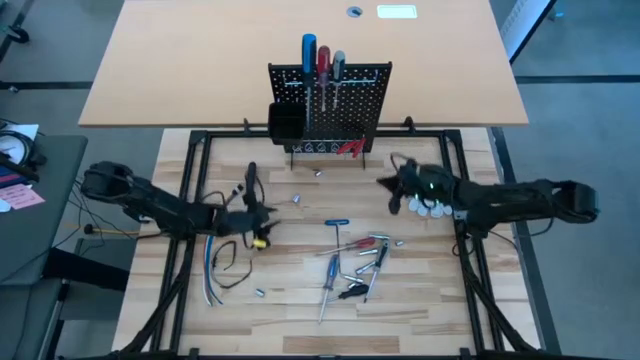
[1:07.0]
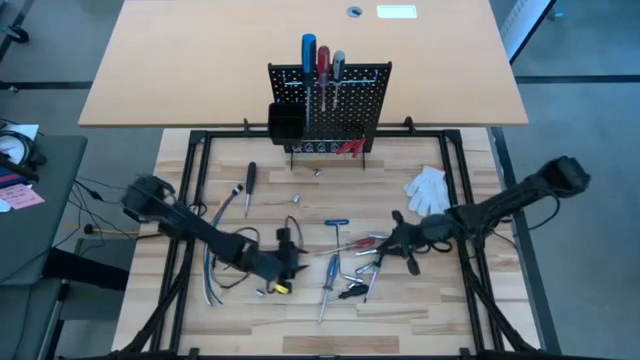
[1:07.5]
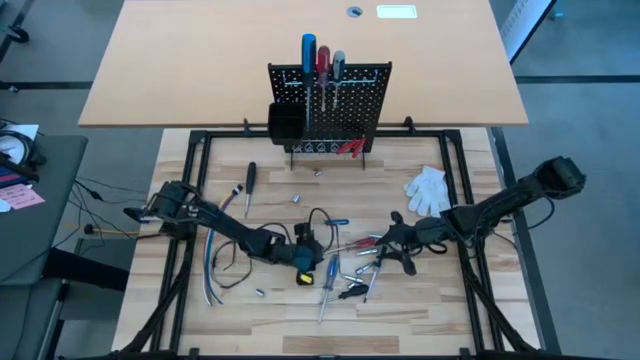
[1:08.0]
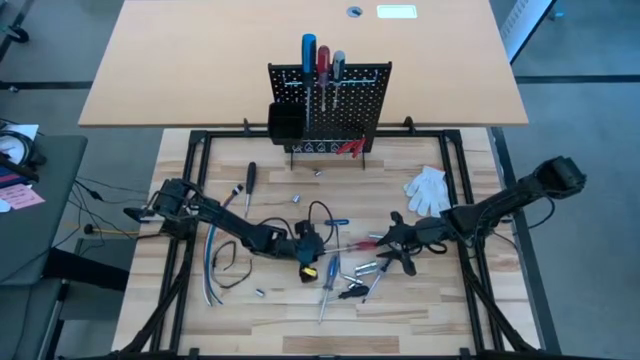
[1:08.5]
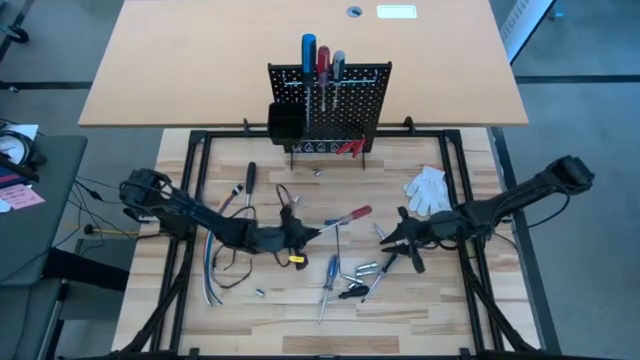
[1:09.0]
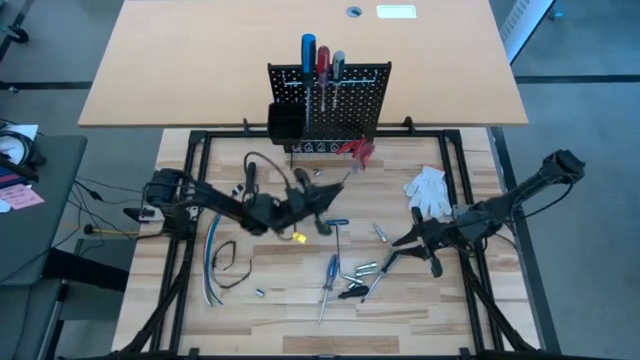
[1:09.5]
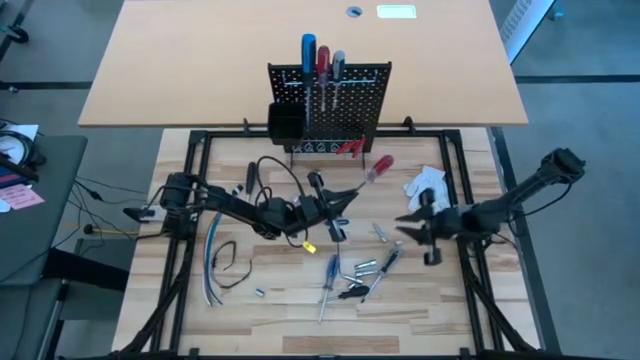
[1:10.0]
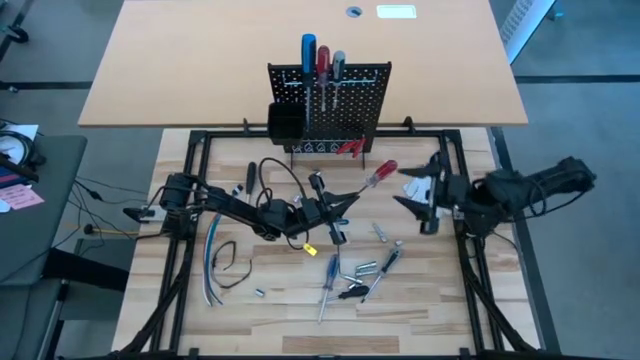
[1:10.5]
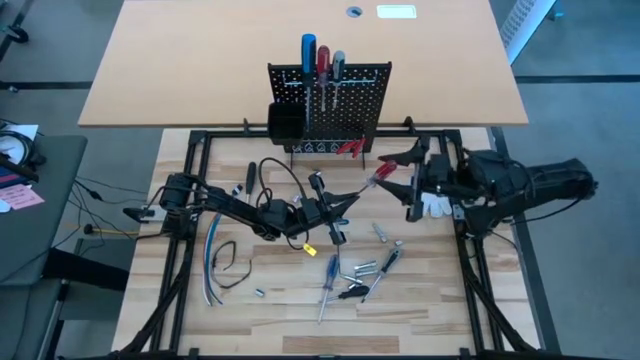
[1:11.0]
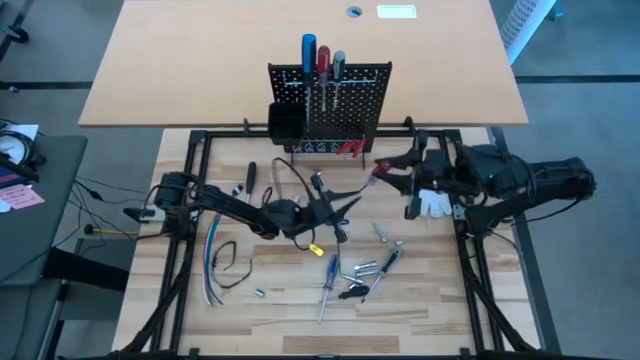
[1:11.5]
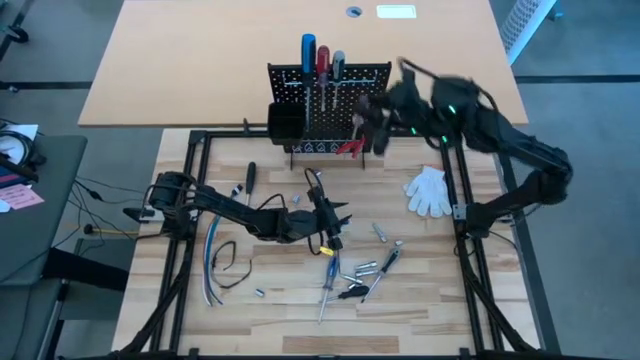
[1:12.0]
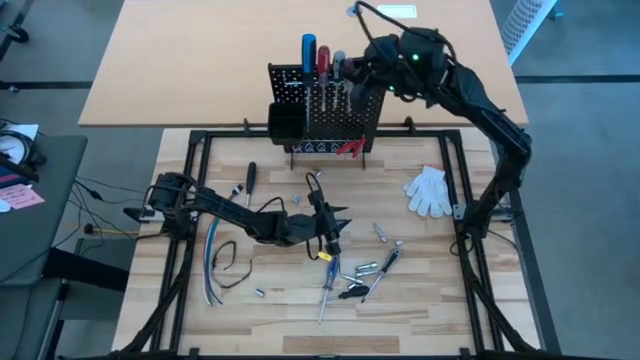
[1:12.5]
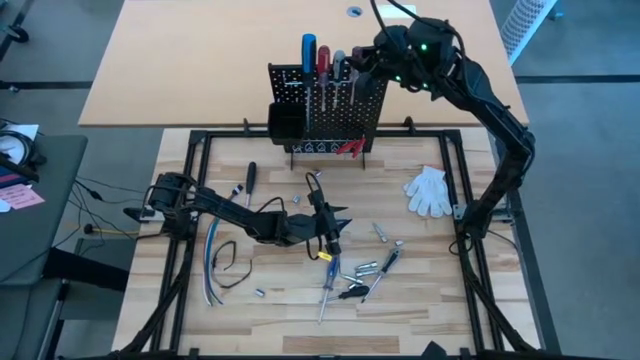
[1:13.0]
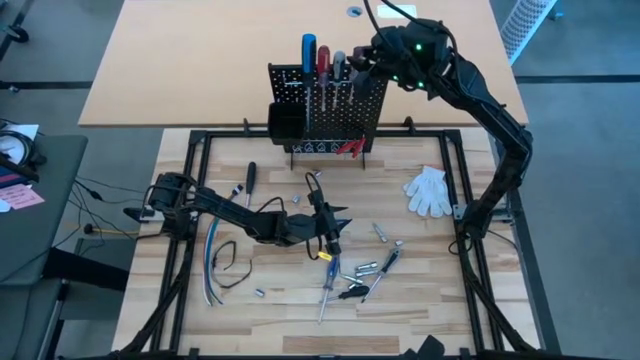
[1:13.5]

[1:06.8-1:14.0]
Task: Hang tools onto peg board
Hang the red screwdriver on the black pegboard

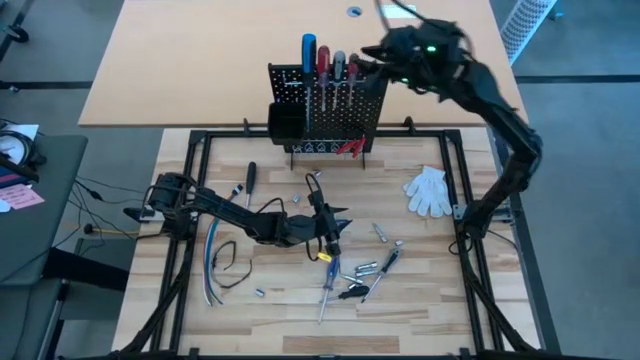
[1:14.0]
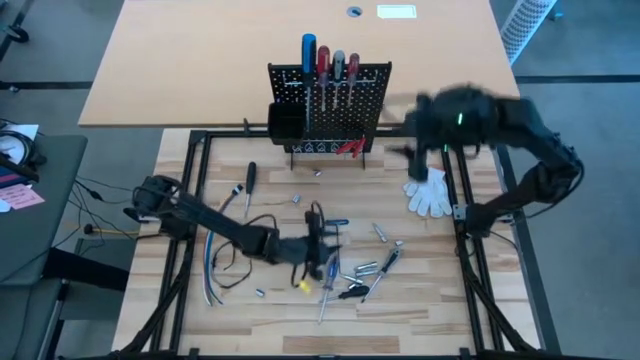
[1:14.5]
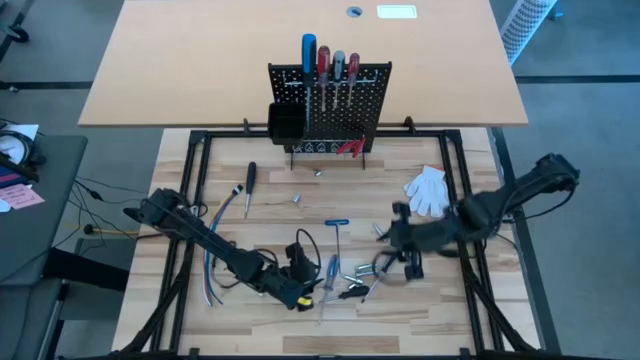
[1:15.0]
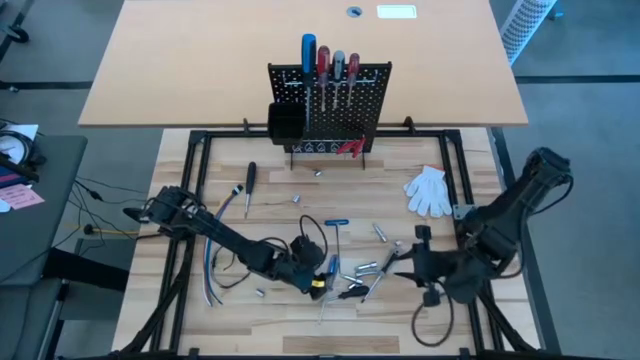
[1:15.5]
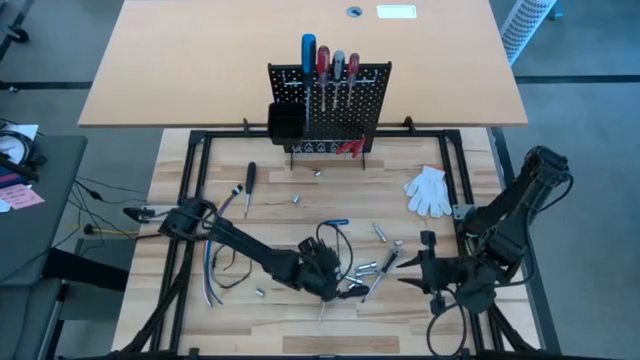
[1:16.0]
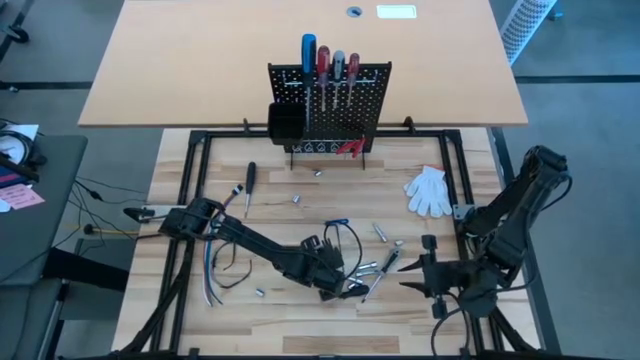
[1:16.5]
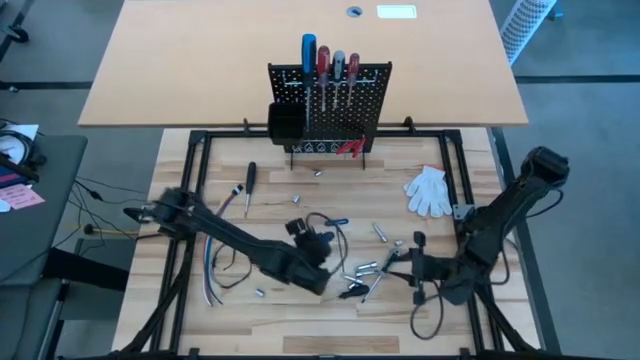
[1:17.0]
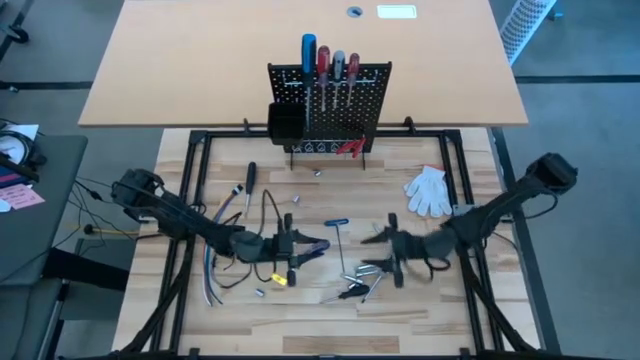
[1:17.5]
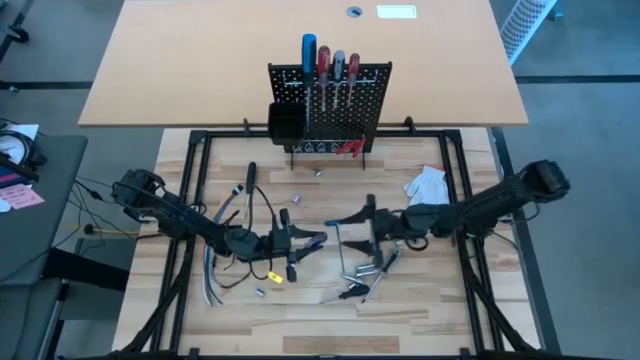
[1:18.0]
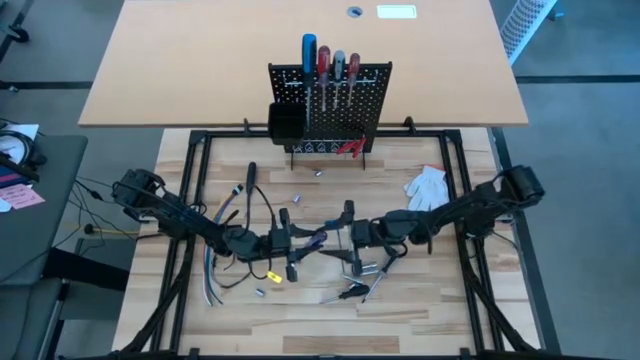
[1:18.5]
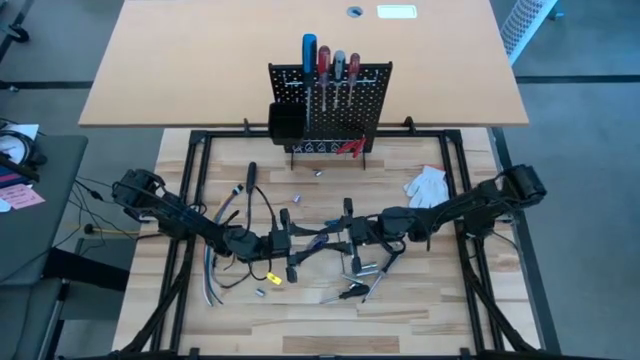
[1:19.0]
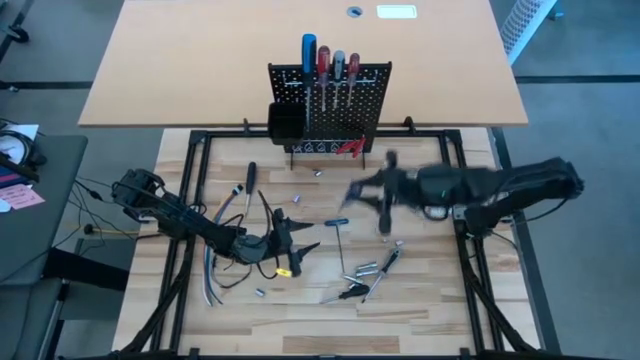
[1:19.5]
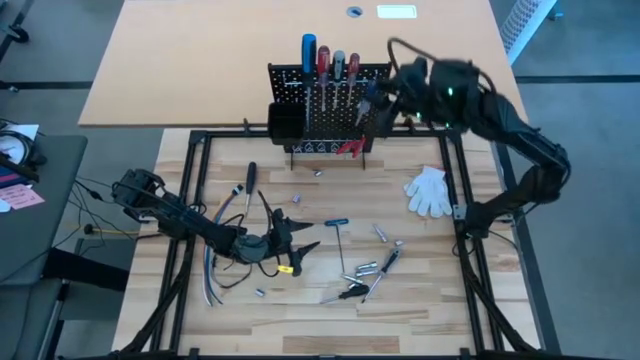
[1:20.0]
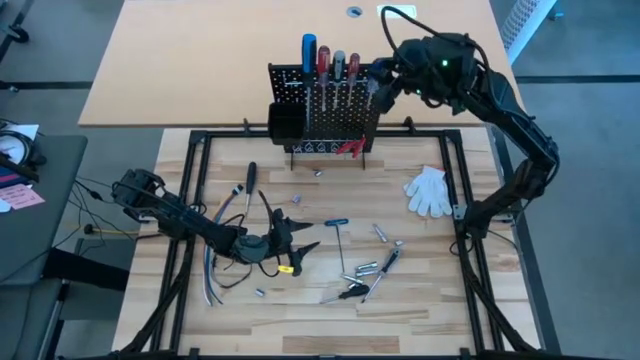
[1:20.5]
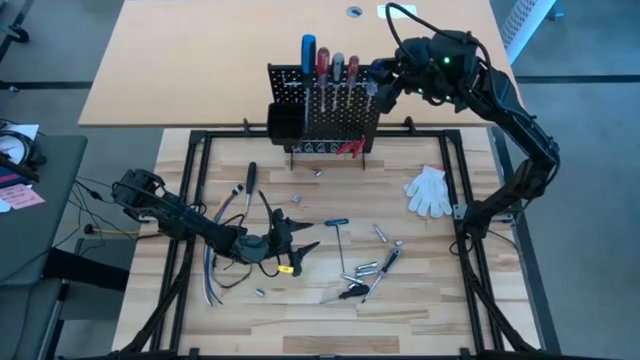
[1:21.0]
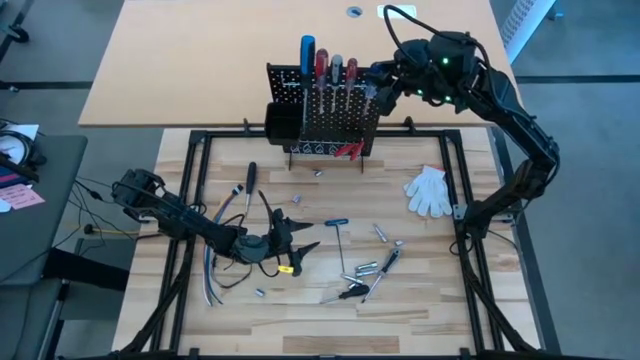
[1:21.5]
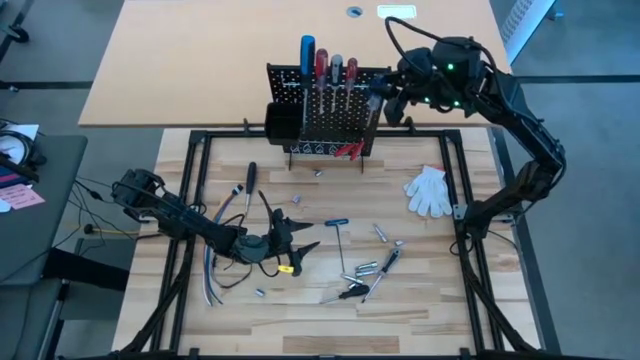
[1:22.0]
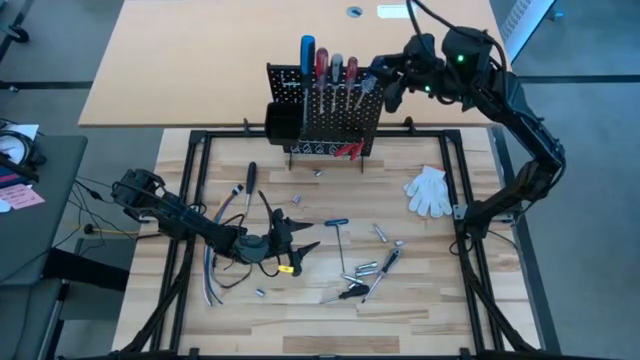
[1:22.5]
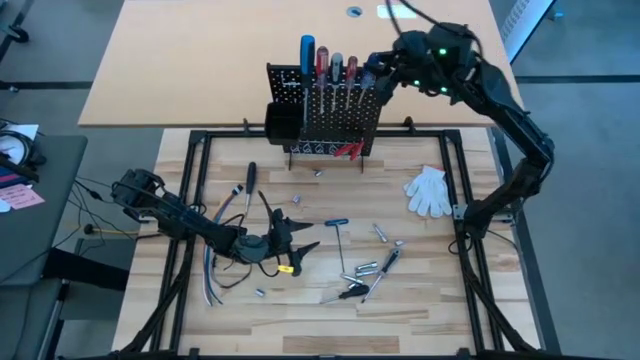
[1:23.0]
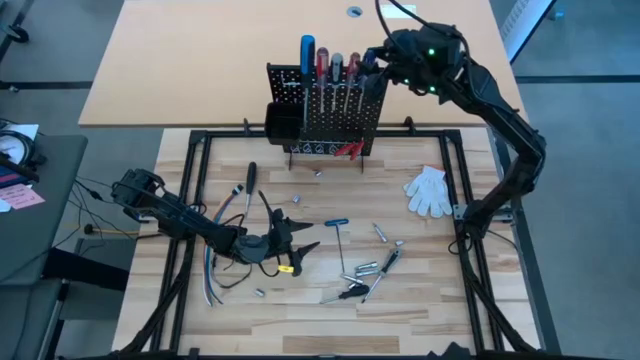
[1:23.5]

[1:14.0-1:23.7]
Hang the blue screwdriver on the black pegboard

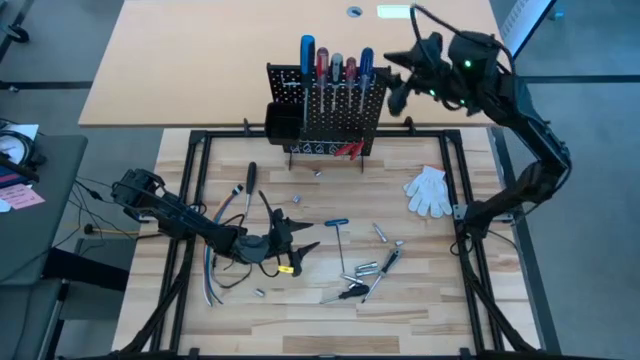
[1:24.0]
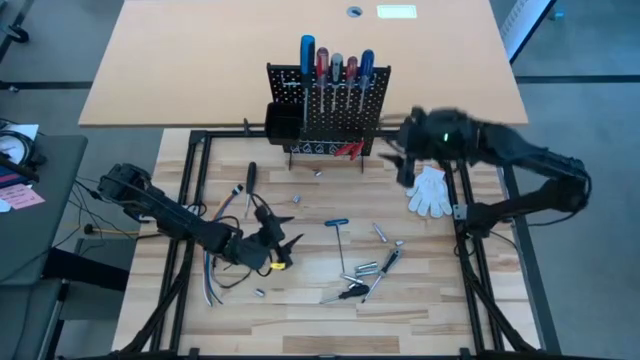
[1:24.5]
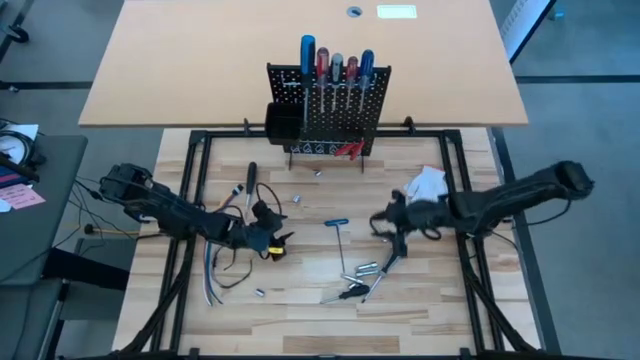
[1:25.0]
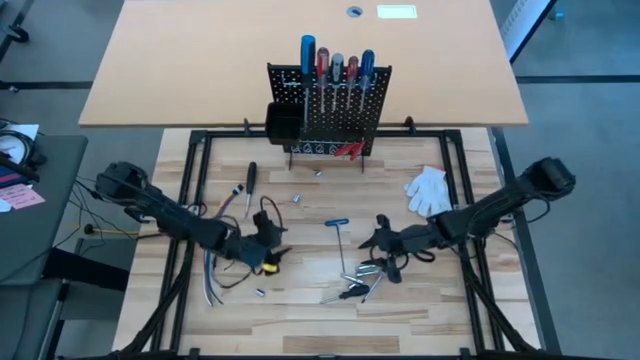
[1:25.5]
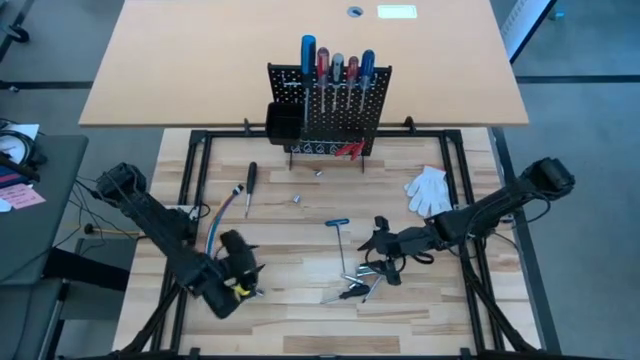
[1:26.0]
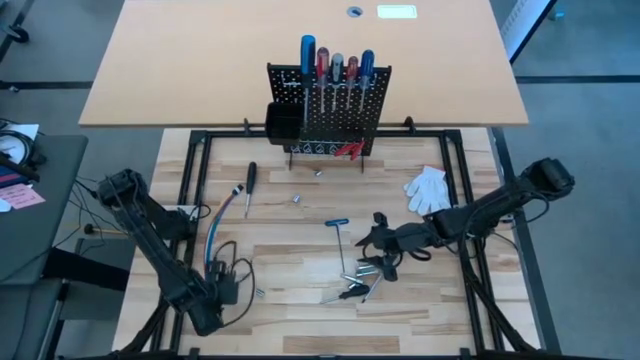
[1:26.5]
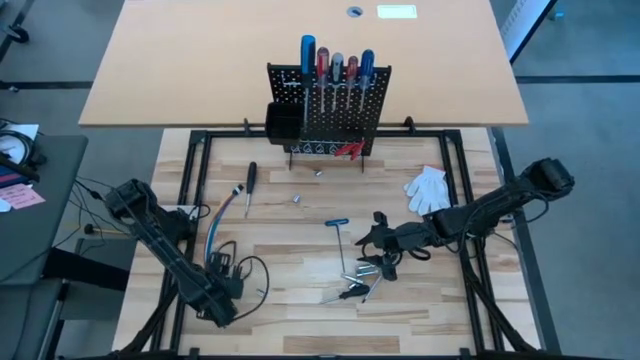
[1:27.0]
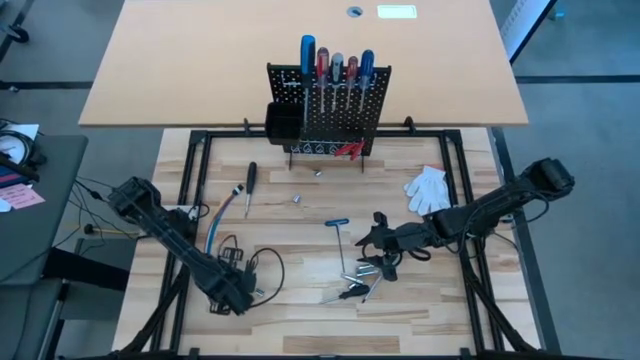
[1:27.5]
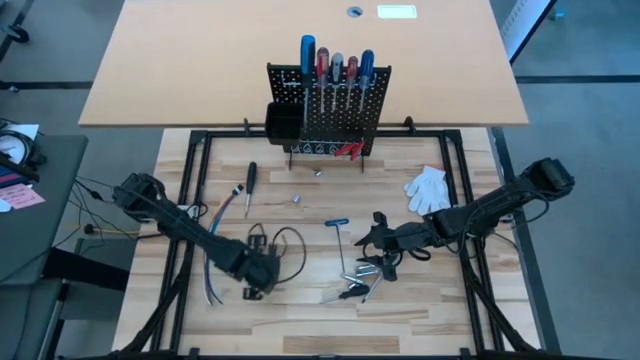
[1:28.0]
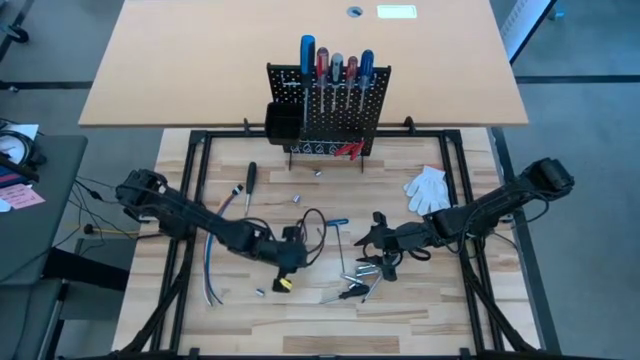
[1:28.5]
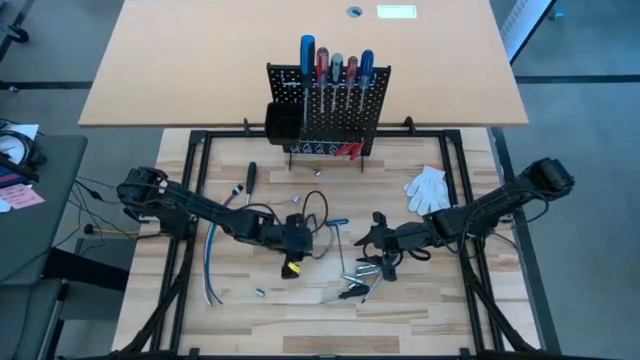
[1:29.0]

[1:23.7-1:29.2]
Move the black safety glass to the center of the table
